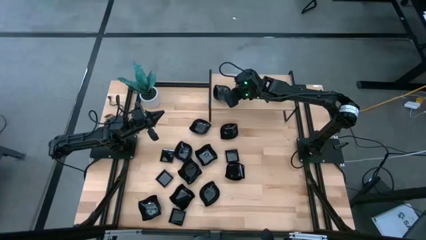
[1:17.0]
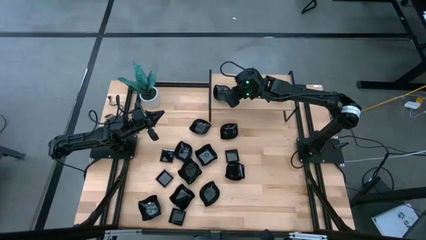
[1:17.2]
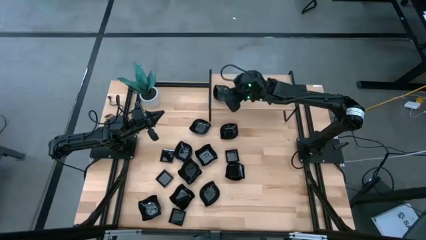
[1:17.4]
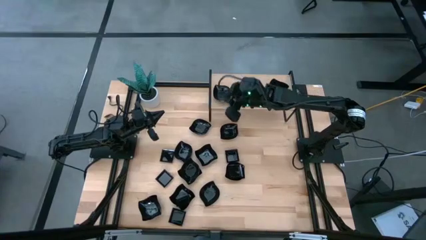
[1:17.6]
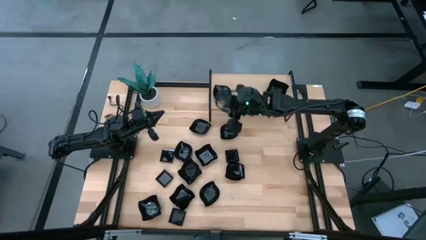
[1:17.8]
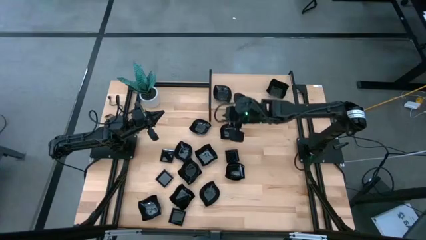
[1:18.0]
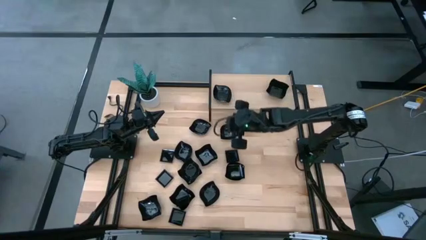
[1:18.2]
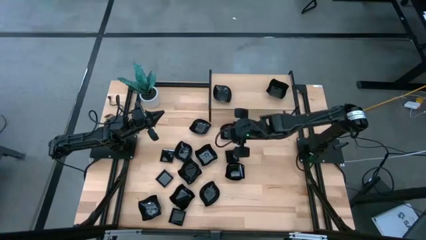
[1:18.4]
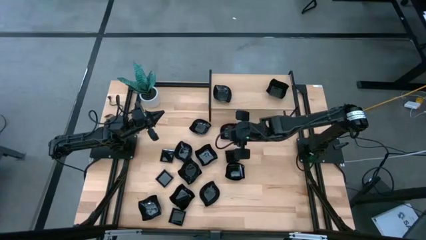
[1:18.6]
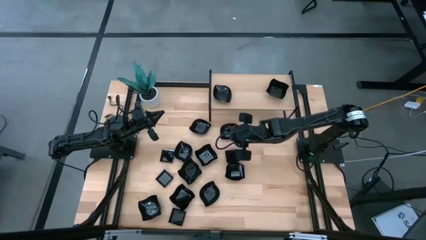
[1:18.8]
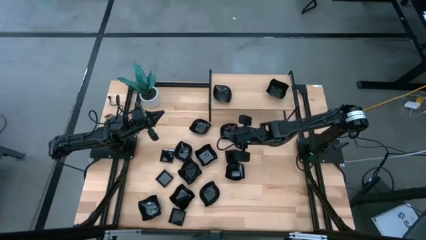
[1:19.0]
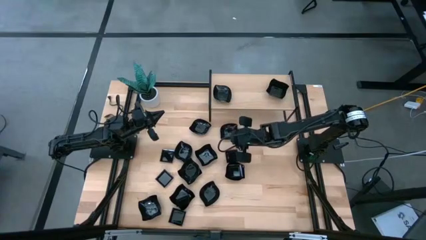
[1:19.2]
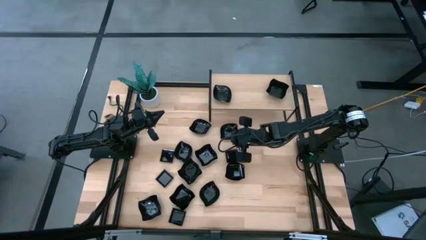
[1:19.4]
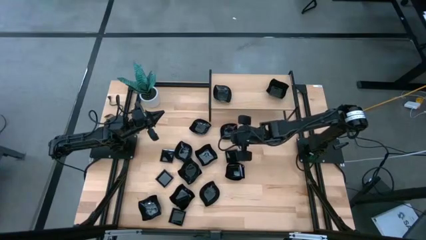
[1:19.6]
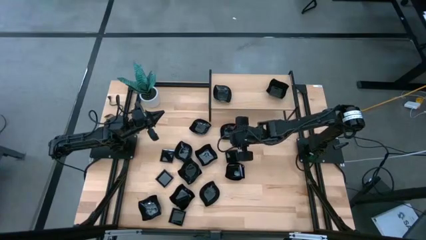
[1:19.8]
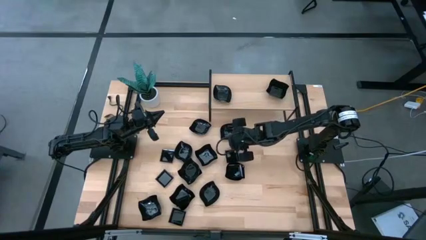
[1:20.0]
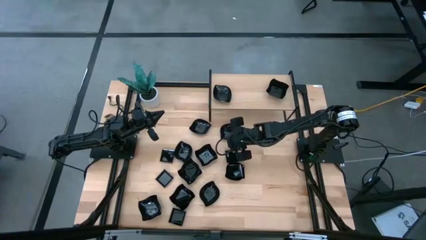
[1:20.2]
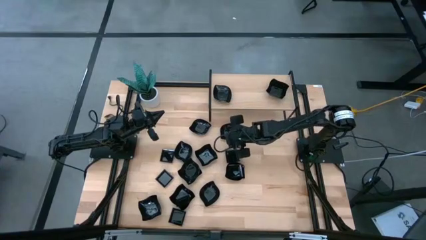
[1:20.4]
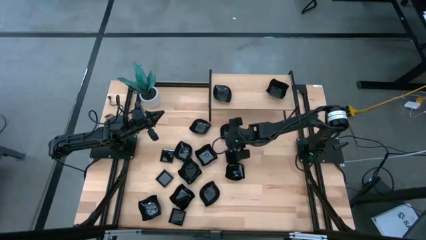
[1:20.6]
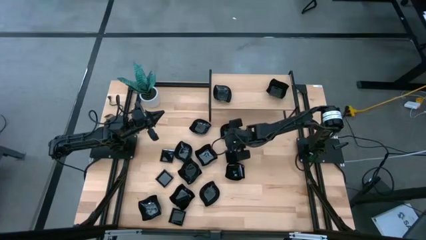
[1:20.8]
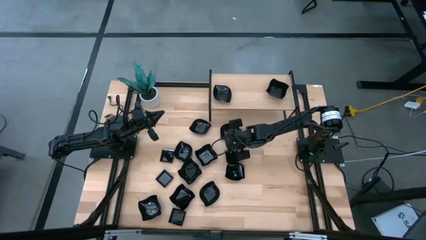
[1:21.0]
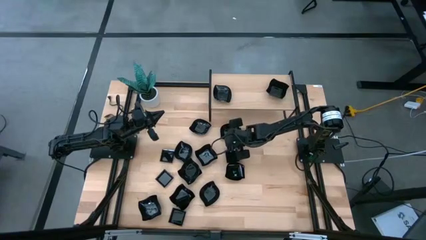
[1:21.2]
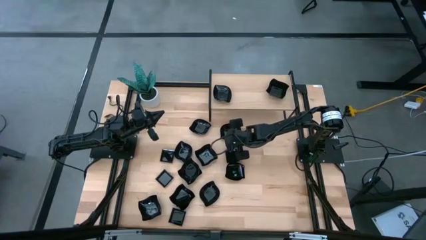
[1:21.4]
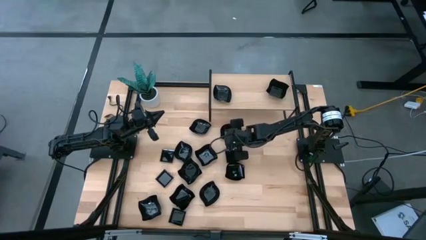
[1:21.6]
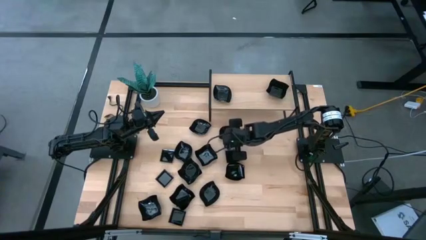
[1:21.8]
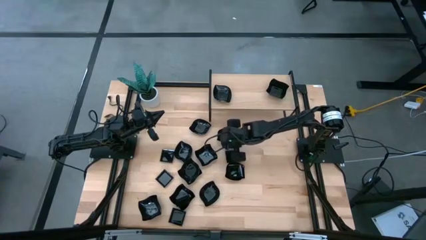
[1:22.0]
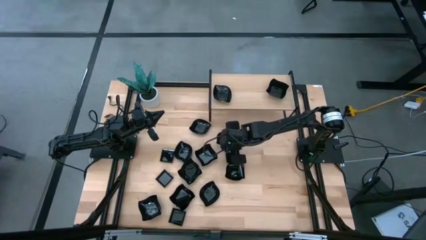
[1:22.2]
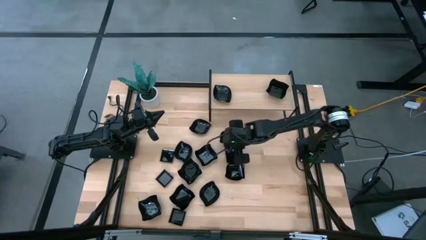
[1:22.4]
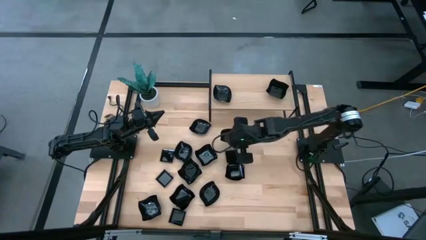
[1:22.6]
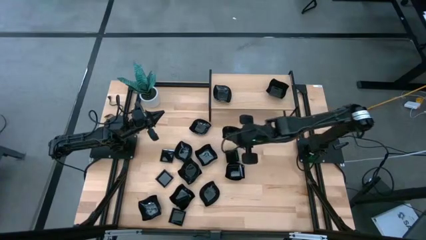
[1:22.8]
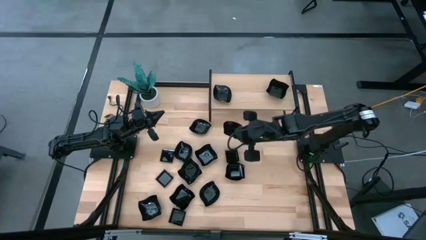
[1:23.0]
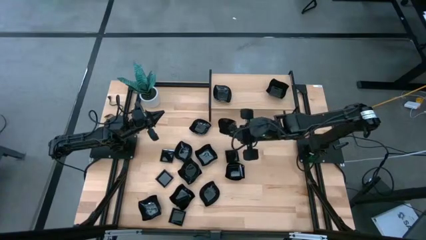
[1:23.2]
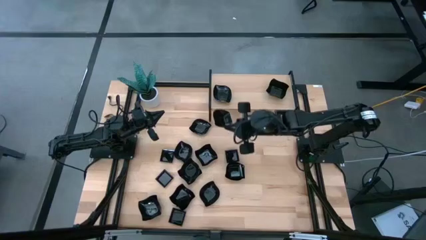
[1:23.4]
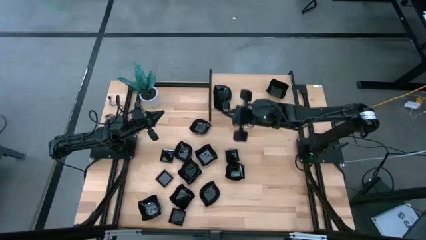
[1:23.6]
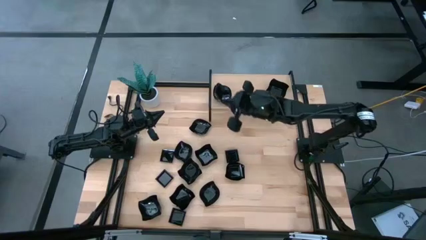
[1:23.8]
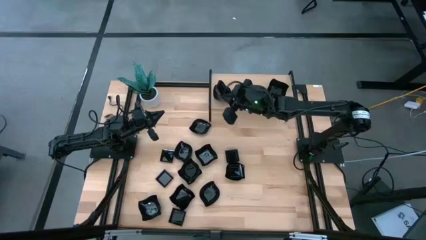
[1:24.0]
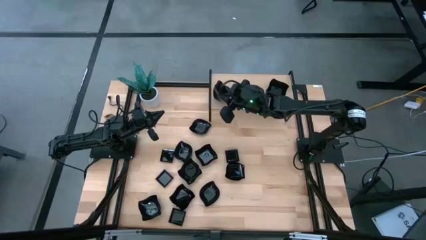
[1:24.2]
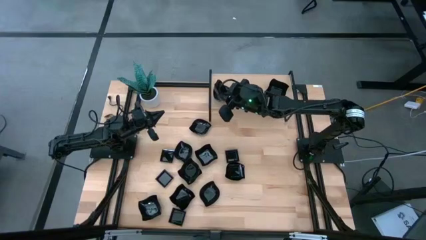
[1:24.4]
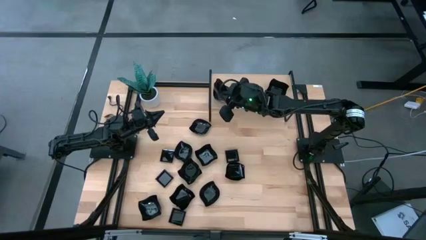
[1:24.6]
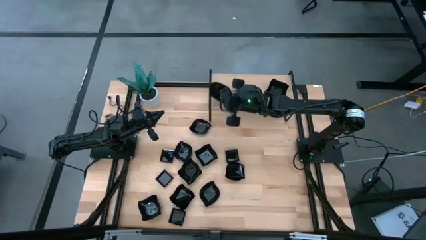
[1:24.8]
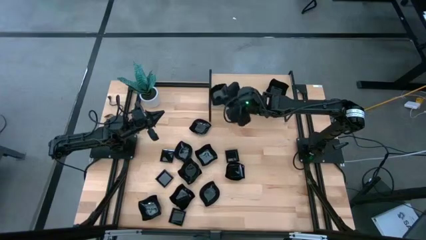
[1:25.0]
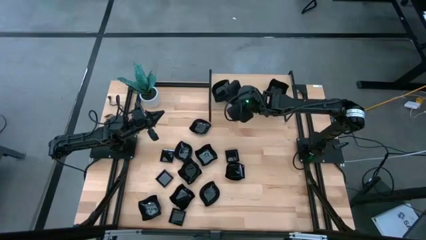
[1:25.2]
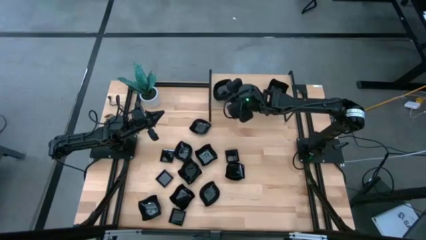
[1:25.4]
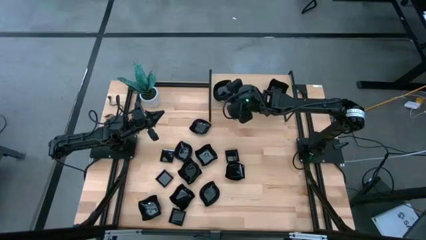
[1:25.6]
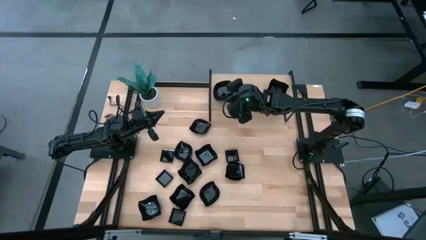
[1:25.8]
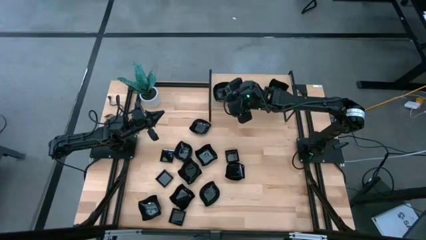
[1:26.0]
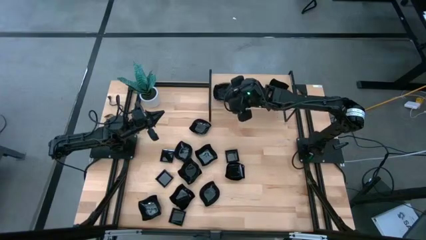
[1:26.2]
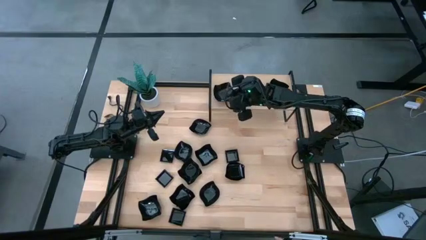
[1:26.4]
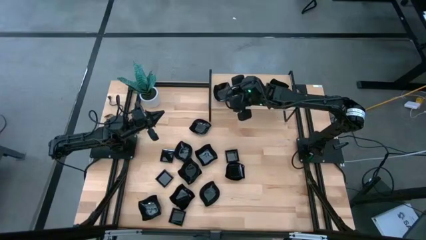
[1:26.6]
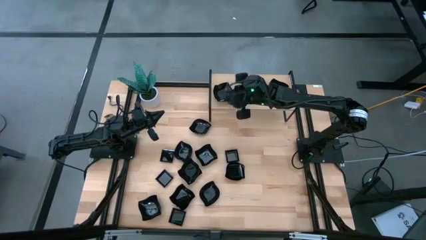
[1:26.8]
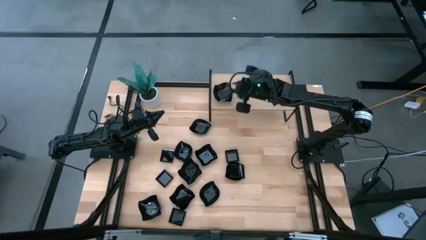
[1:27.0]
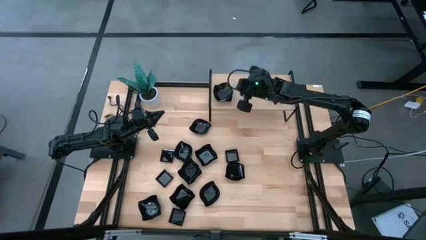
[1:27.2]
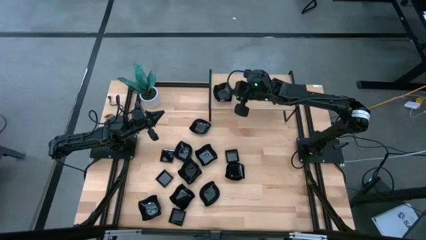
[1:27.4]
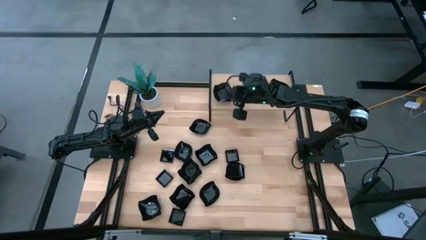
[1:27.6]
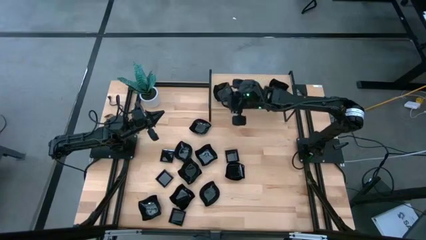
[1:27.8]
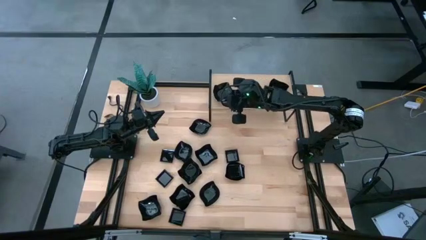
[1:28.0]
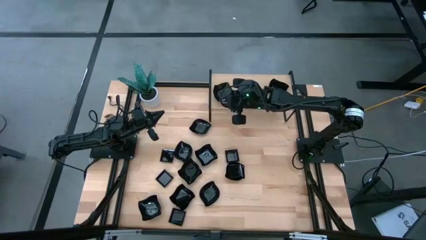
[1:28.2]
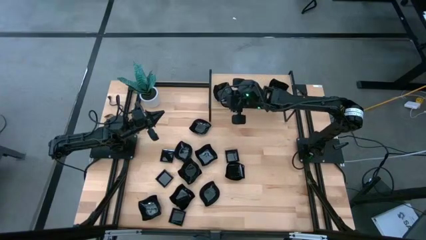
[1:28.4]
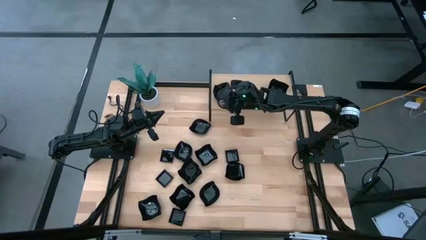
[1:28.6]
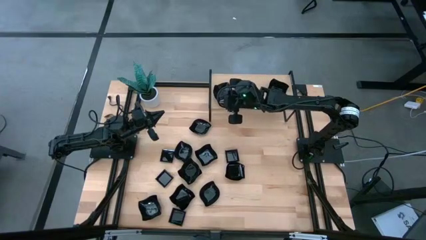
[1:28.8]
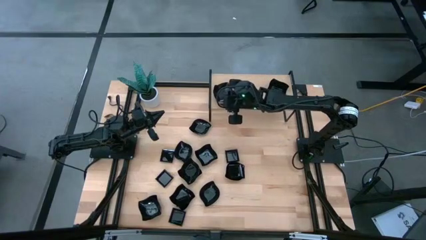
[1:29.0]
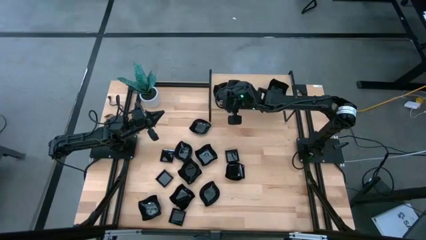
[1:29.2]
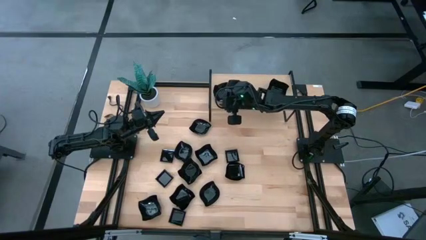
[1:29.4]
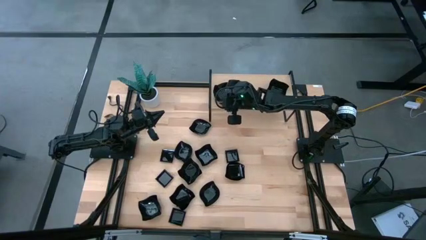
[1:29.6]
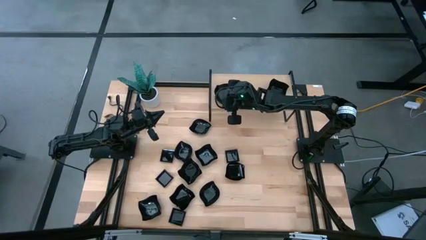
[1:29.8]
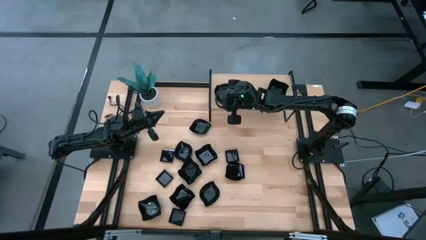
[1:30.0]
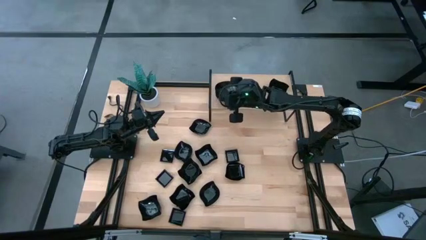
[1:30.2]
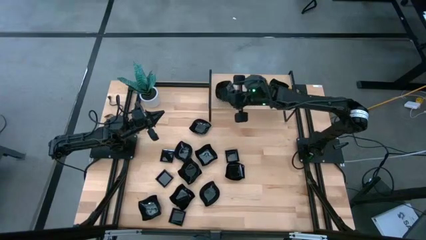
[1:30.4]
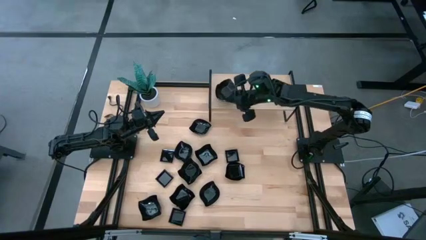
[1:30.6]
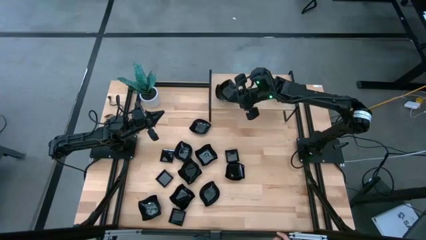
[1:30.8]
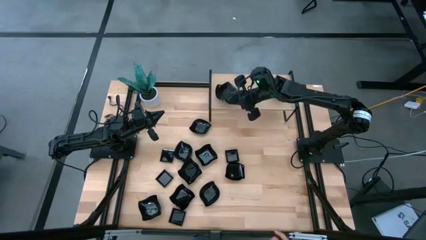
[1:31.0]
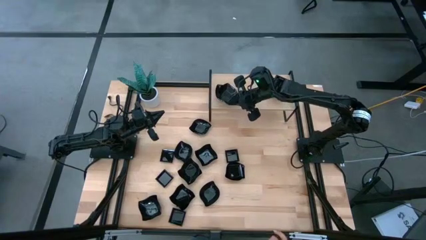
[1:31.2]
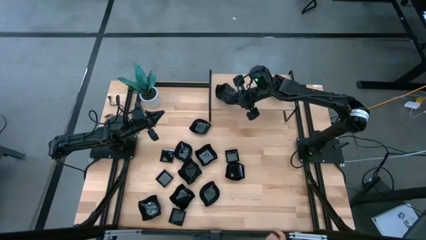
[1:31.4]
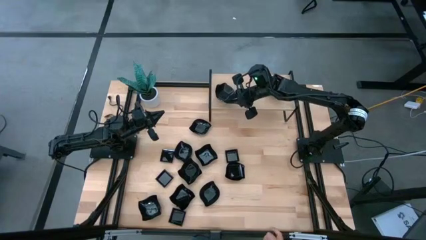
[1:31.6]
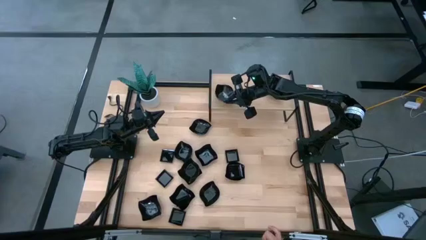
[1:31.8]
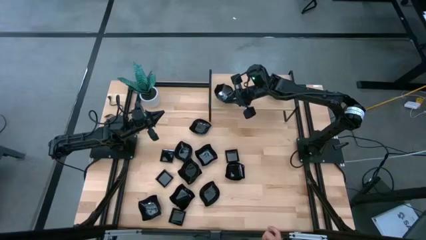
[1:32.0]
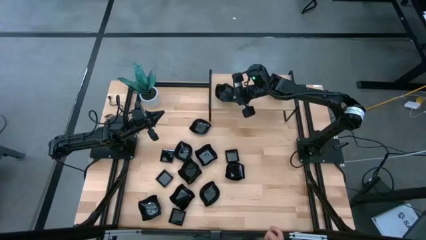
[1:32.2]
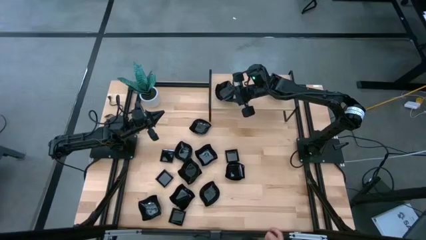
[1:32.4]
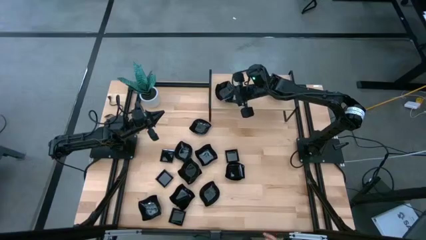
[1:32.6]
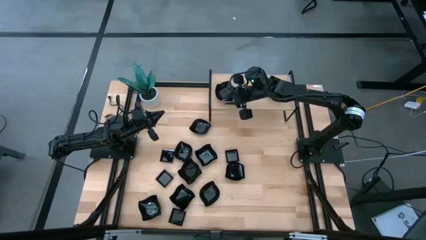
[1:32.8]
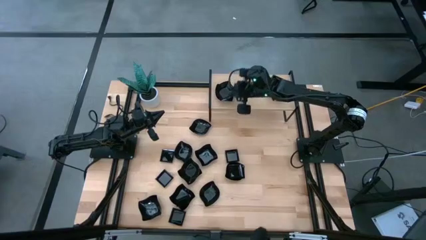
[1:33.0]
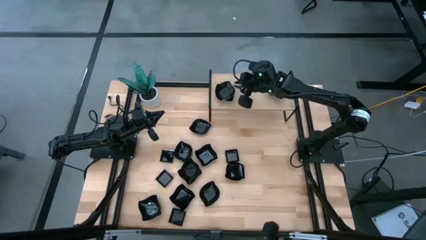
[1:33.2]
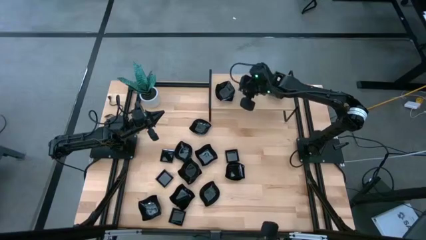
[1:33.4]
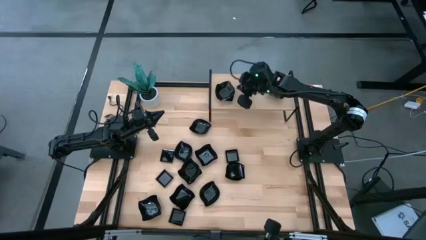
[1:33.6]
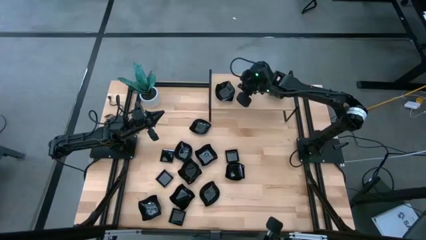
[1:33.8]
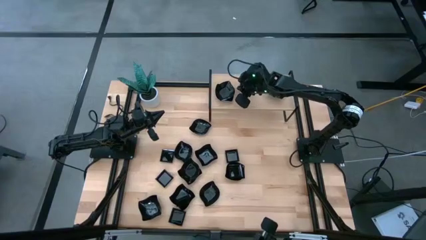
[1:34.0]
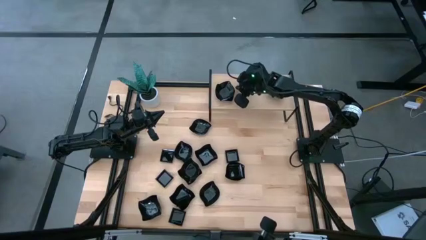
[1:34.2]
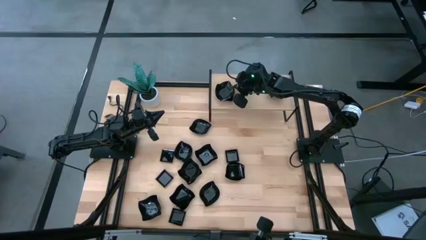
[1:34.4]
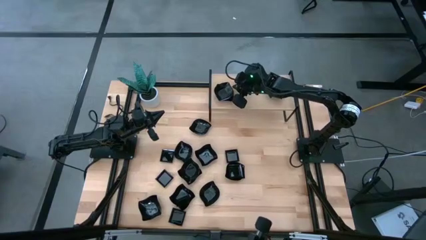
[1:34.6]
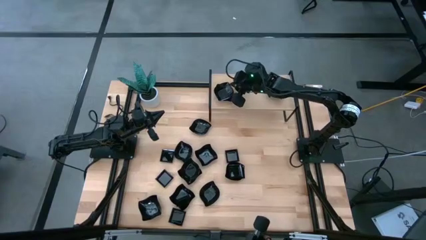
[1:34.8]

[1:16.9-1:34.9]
Task: Pick & Place Mini shaped plates
Stack the black leaf-shaped plate on top of the black leaf-shaped plate on the shelf
